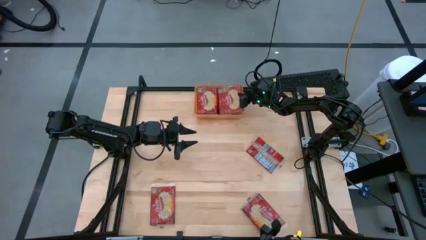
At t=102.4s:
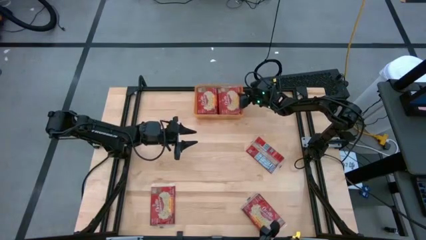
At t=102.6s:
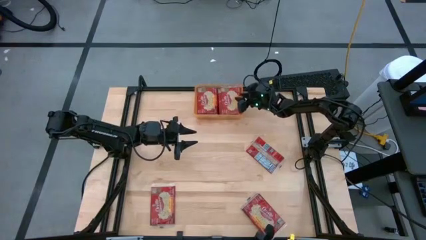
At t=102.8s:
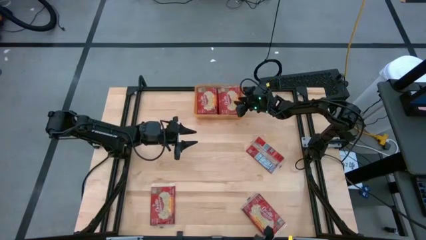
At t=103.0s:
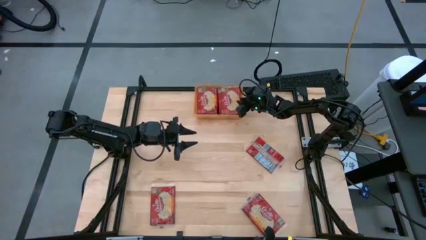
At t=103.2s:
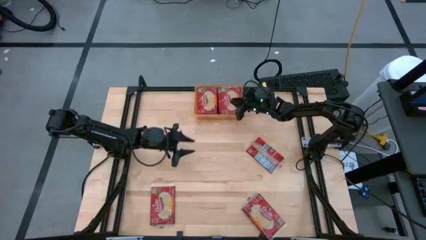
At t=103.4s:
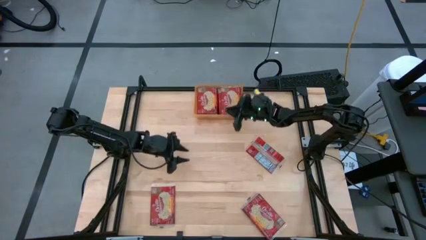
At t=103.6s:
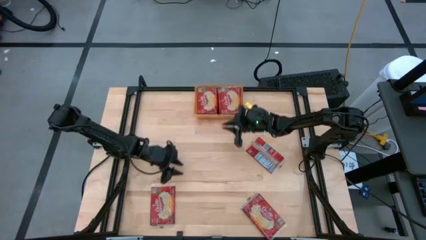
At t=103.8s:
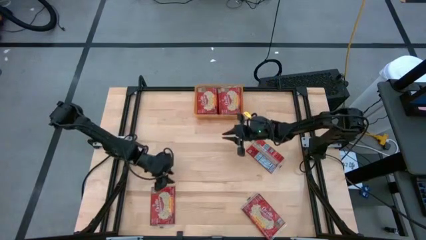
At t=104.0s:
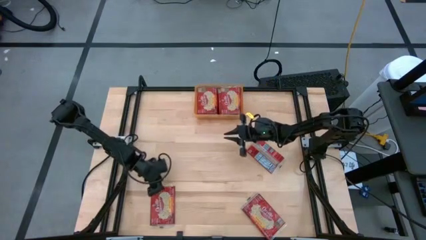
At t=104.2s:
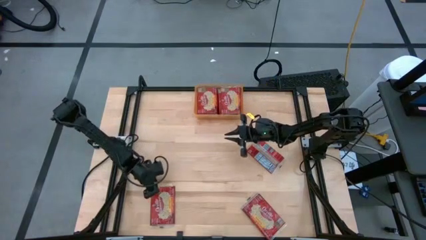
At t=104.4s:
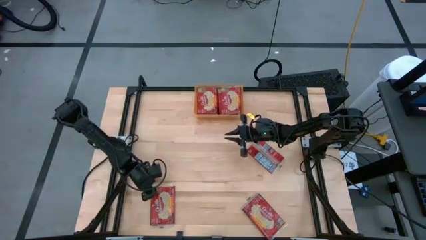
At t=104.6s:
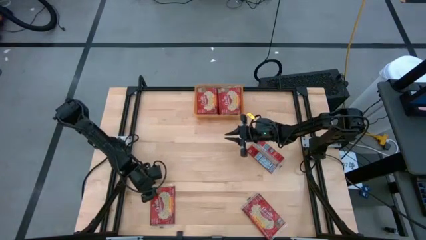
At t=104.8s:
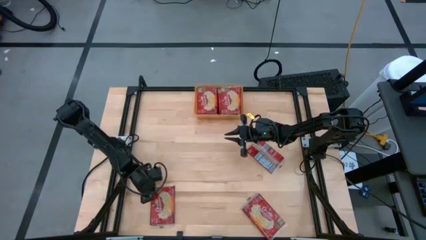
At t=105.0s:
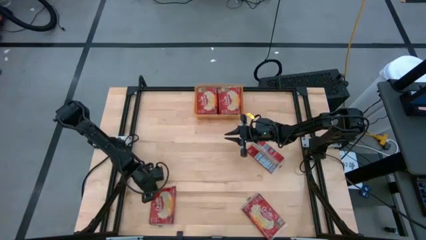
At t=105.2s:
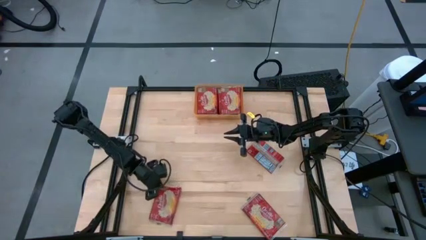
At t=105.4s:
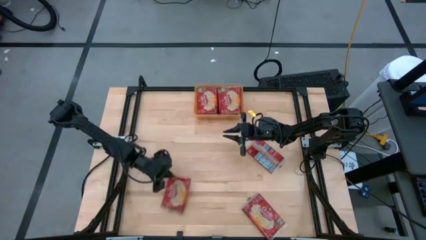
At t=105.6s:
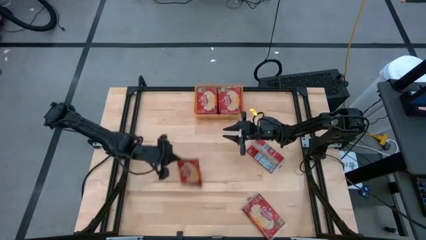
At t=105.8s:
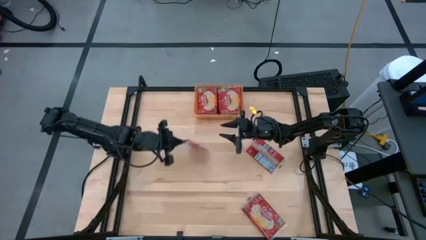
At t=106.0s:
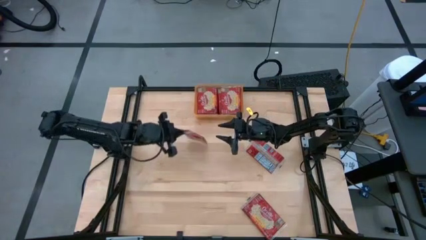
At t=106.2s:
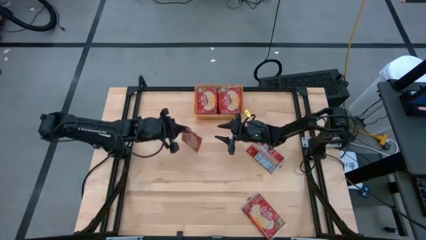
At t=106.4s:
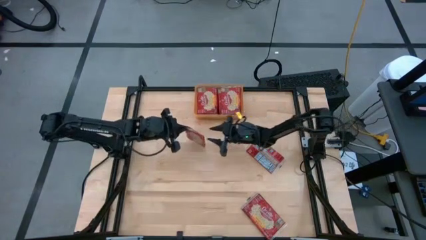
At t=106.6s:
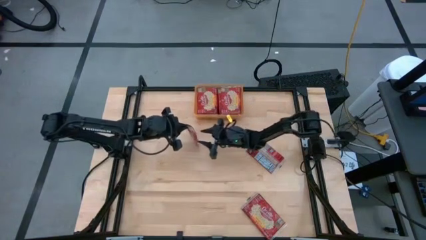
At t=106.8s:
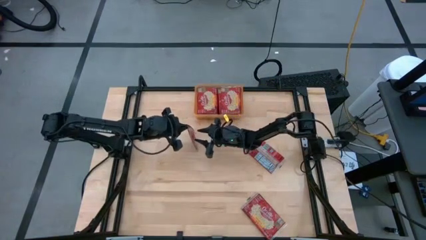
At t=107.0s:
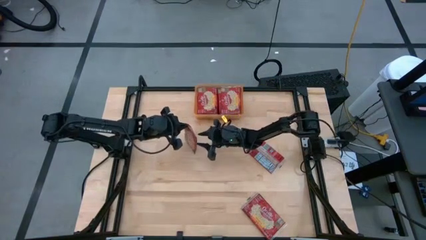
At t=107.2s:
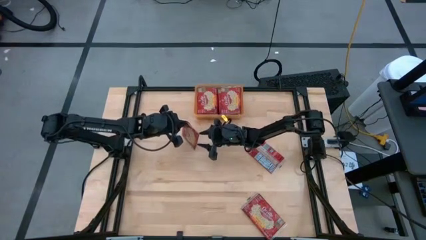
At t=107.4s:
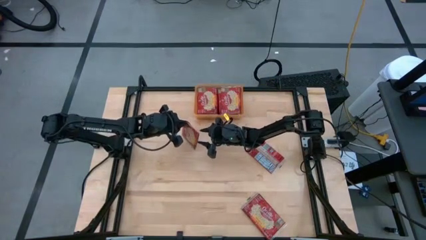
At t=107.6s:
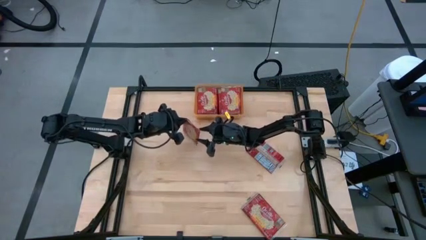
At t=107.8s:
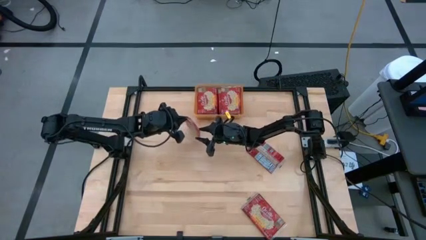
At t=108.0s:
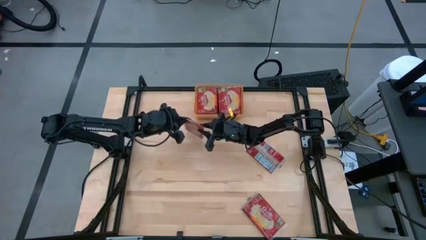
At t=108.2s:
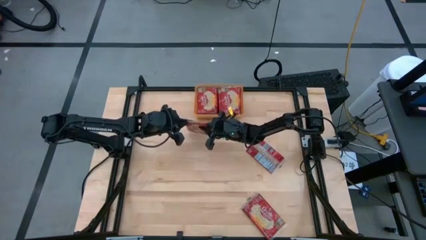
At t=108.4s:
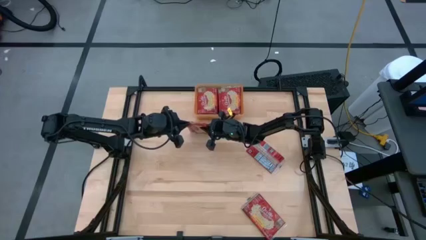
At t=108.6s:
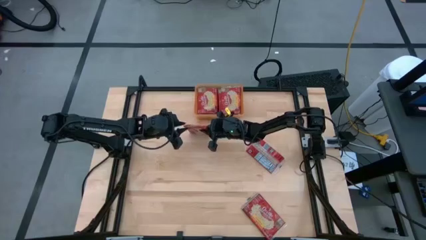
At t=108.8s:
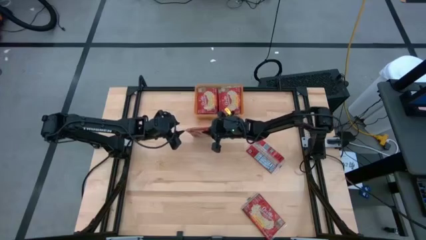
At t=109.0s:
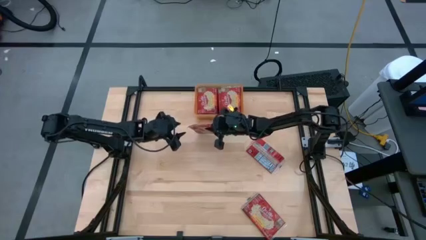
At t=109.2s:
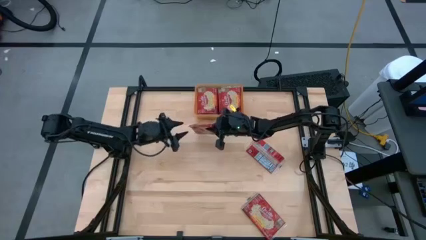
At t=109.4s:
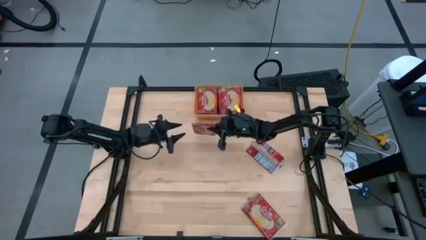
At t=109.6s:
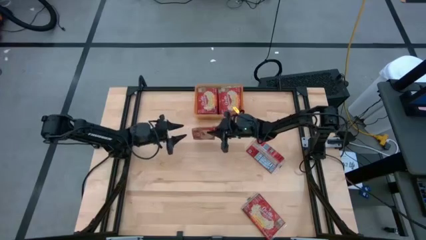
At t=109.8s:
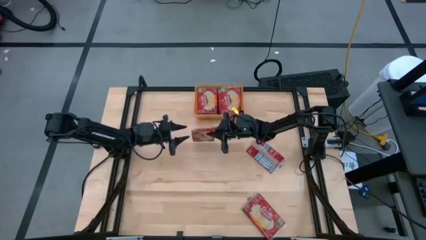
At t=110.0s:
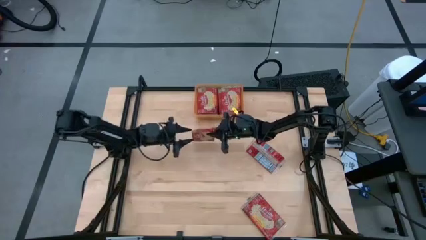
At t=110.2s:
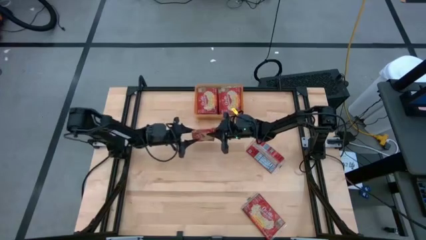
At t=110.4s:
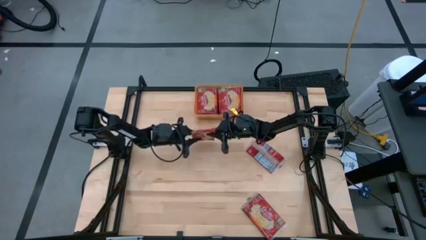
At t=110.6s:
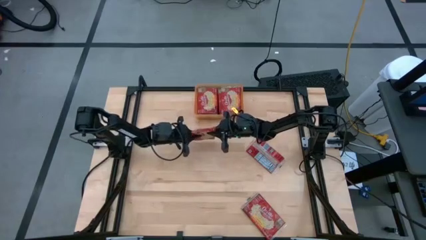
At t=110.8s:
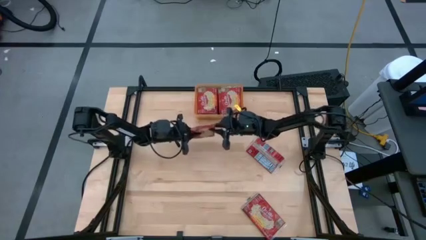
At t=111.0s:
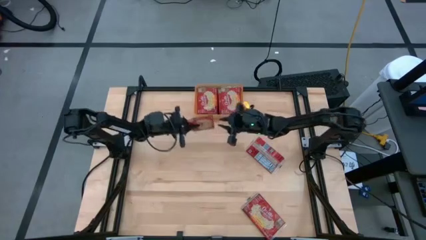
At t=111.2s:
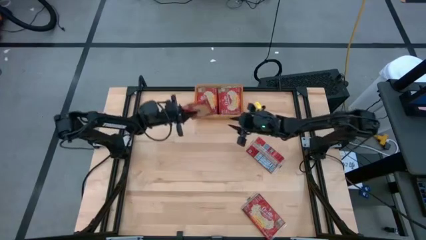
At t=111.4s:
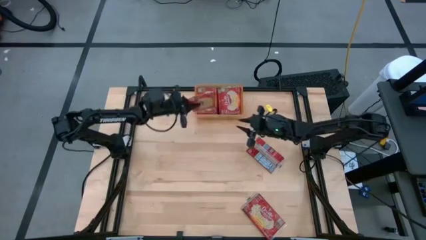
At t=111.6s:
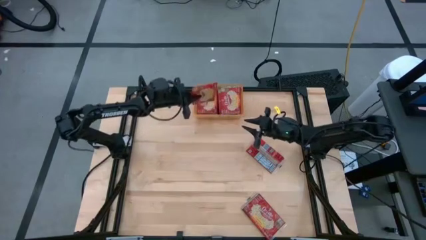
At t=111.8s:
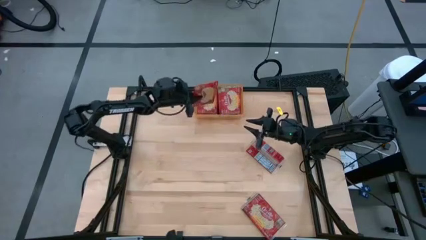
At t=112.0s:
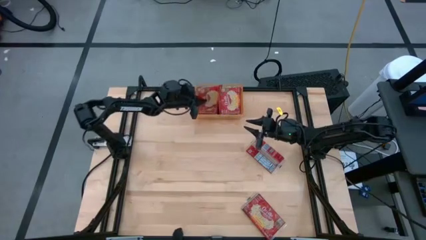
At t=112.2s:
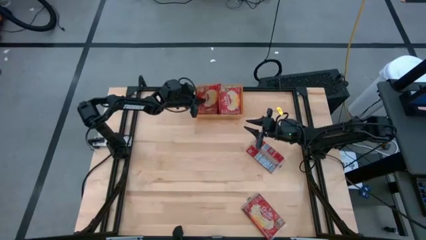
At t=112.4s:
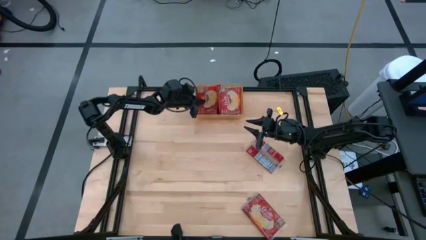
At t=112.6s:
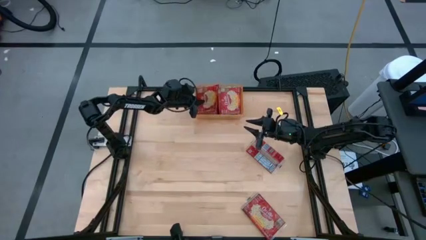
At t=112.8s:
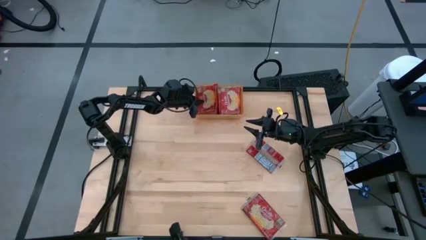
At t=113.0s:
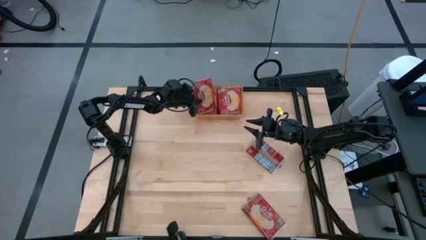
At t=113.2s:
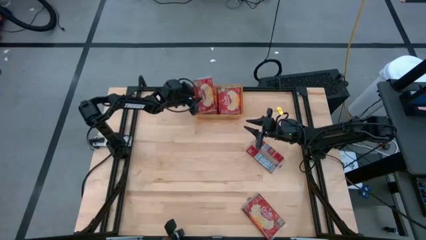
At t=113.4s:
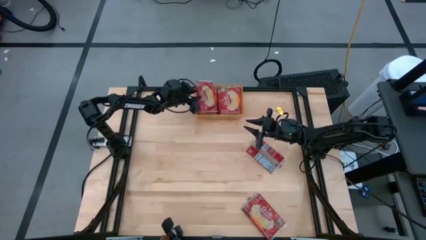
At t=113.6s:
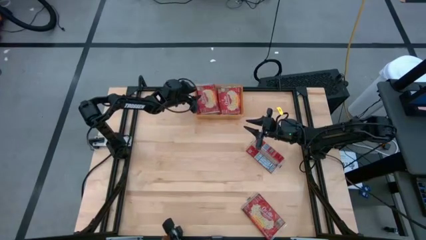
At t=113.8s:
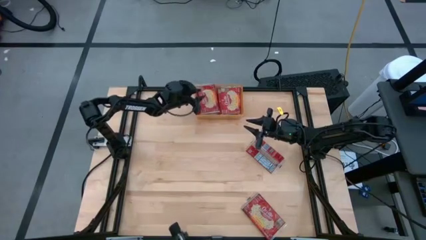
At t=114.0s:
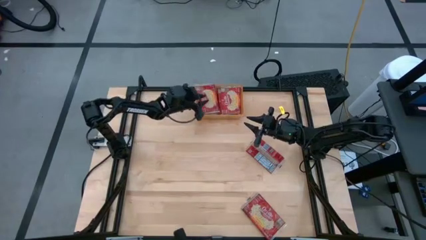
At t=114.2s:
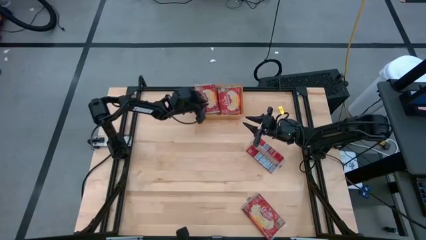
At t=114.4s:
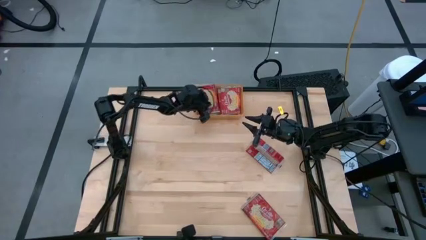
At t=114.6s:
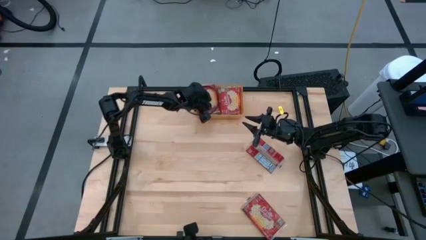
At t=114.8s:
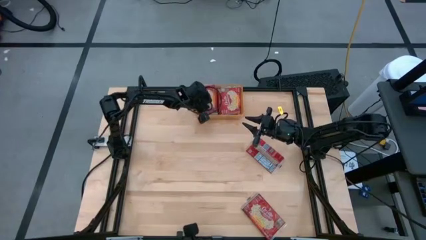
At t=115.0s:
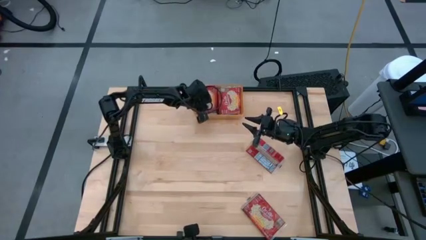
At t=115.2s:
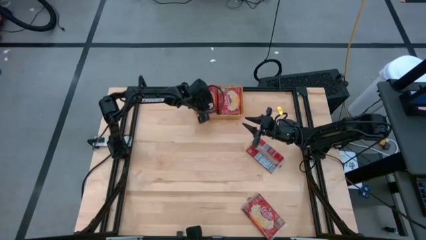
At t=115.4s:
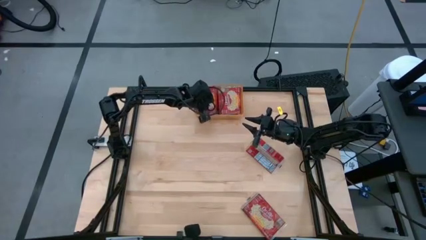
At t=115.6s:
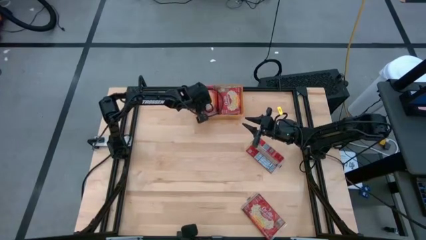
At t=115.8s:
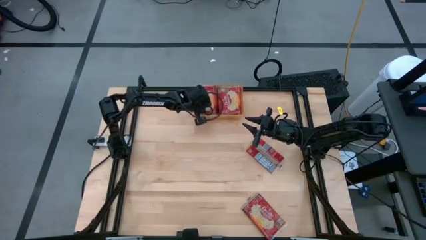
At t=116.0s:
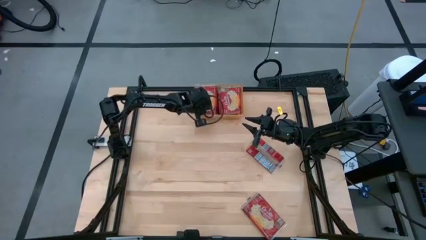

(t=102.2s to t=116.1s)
Task: Sort popcorn bags into baskets
Put the popcorn pack into the orange bin

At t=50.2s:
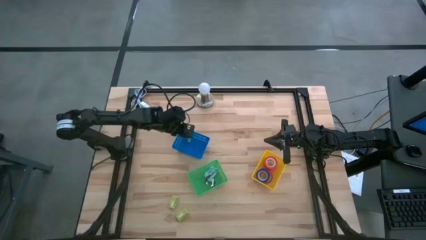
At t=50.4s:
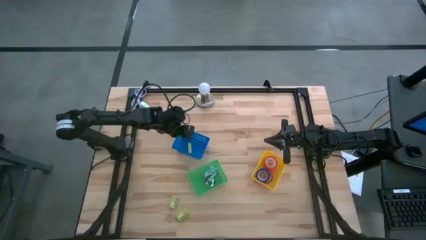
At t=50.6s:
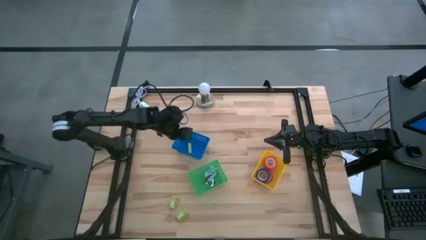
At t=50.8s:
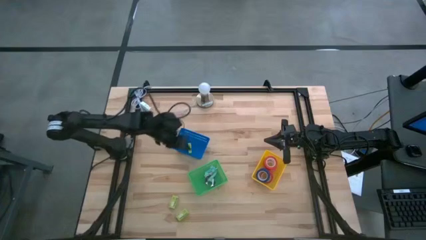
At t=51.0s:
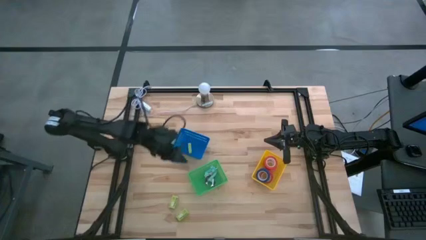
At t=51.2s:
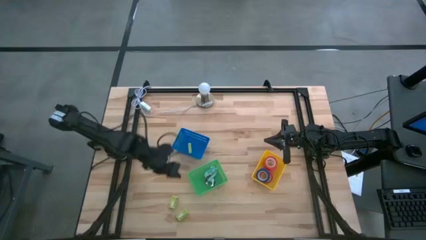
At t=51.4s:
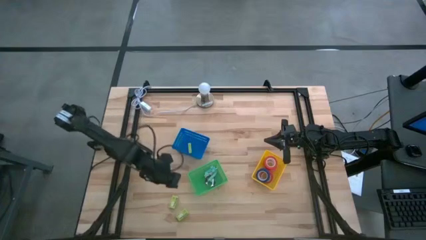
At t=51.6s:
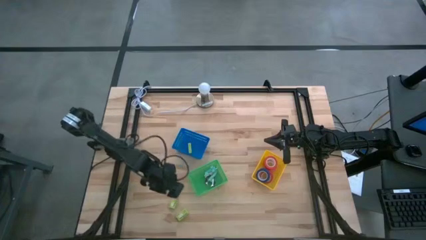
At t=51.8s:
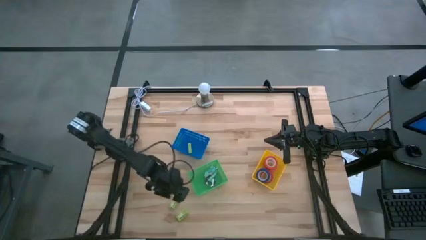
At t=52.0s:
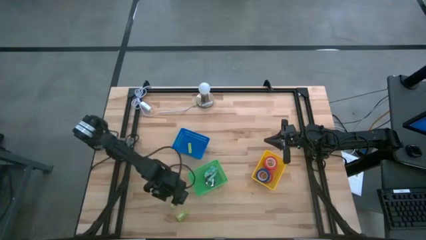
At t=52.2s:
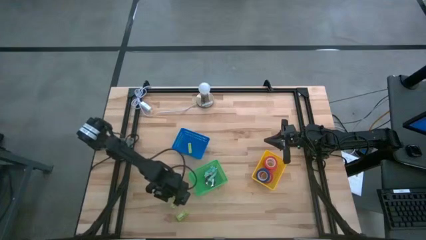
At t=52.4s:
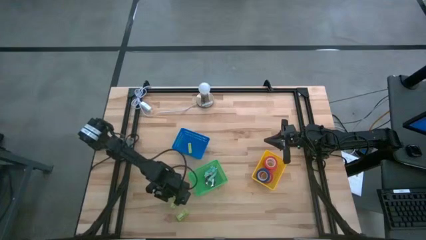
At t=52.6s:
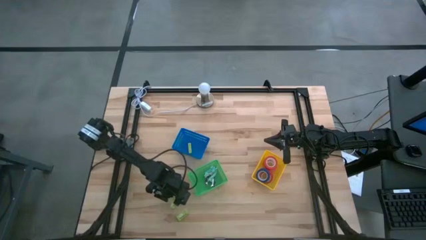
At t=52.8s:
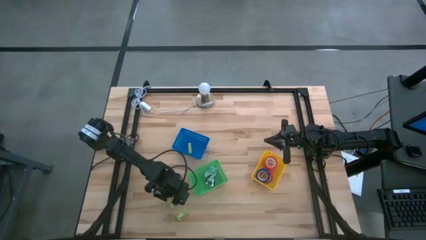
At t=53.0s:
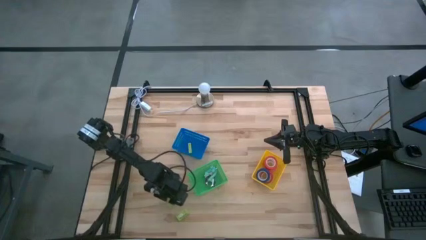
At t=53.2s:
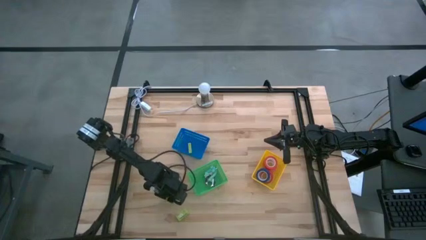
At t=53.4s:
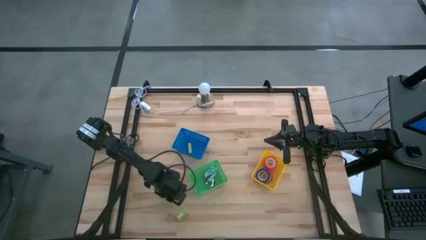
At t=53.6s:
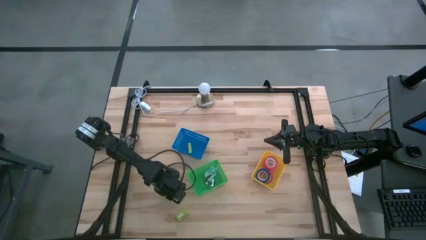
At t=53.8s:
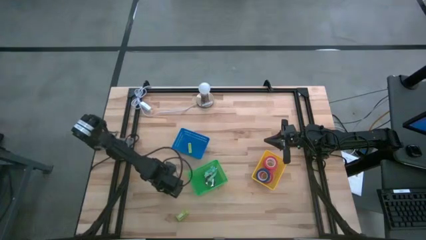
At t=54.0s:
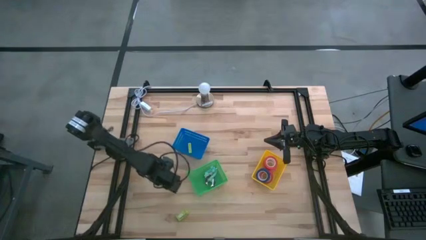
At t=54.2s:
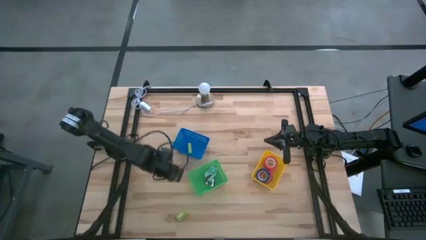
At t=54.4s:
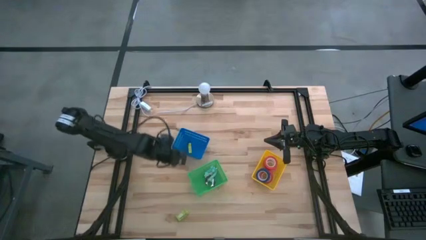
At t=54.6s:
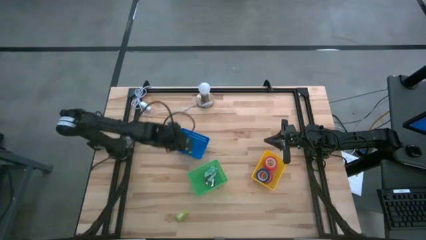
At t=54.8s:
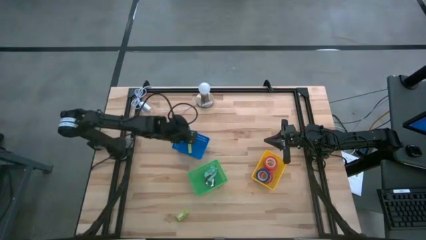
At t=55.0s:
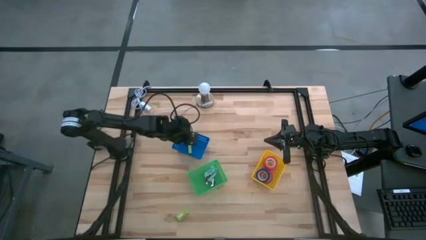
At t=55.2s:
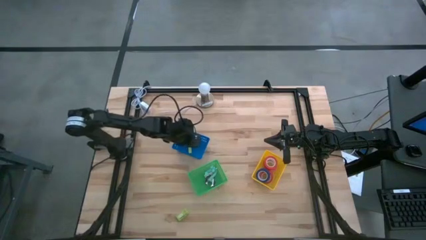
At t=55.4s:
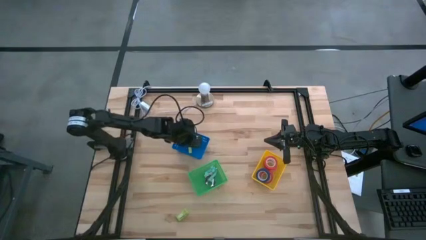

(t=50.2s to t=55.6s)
Task: Pick and place Stapler, Stapler remover, tape
Put the green staple box into the blue bin
